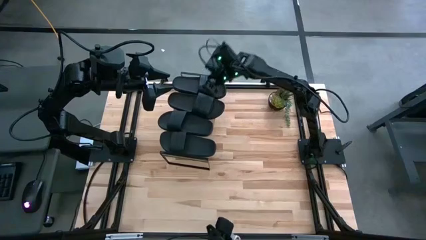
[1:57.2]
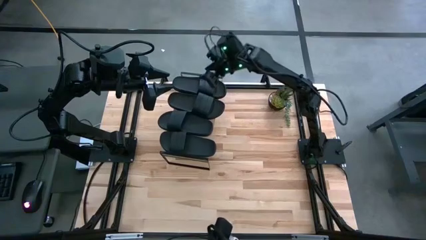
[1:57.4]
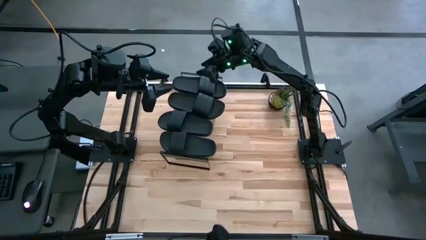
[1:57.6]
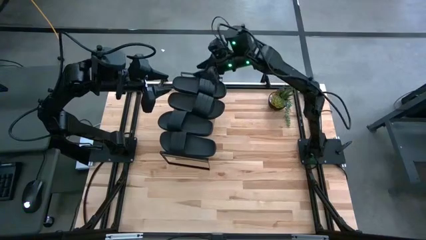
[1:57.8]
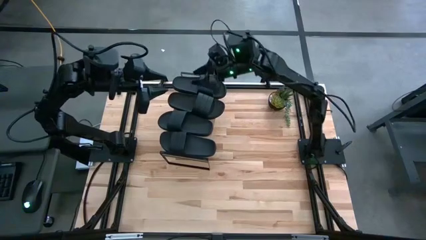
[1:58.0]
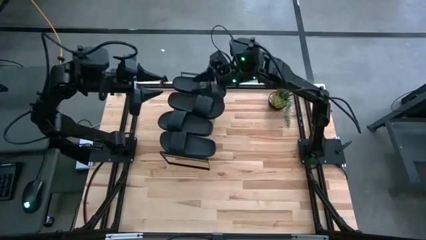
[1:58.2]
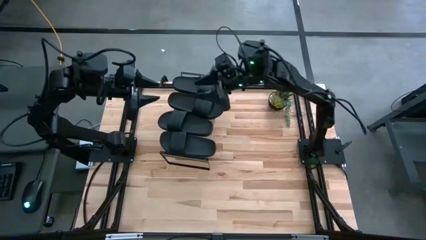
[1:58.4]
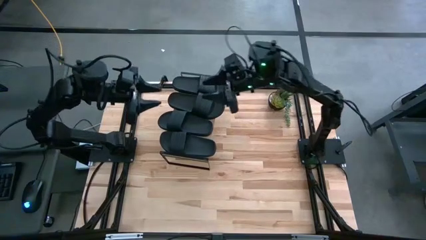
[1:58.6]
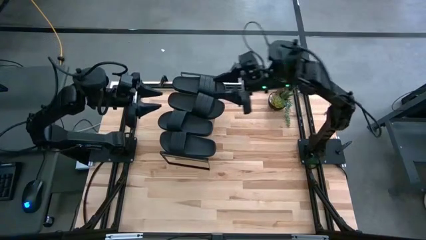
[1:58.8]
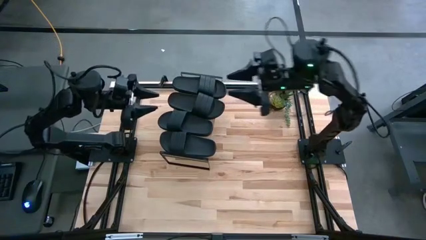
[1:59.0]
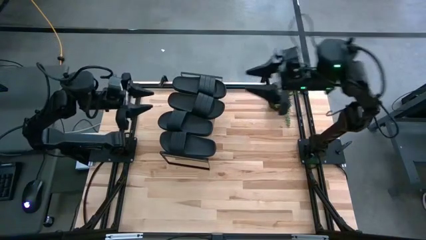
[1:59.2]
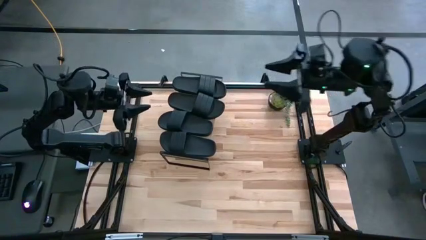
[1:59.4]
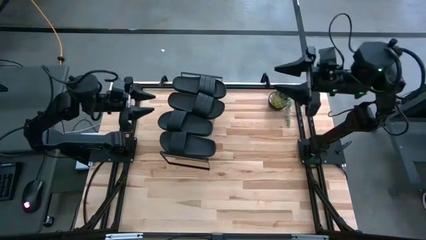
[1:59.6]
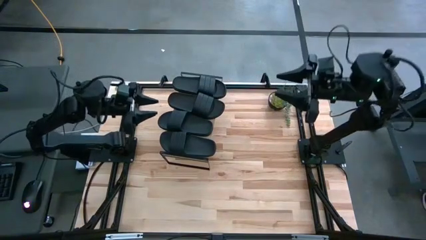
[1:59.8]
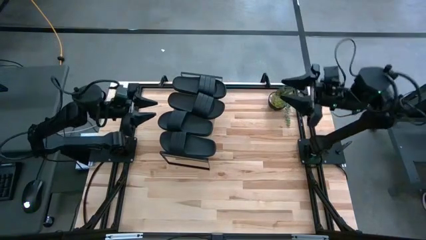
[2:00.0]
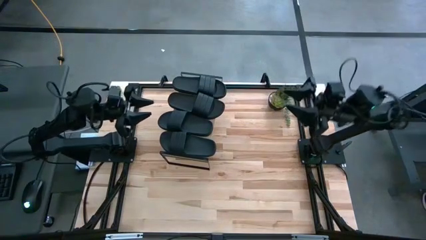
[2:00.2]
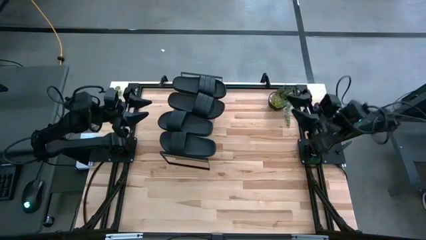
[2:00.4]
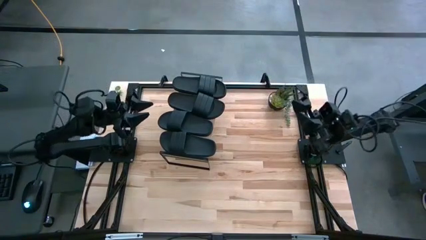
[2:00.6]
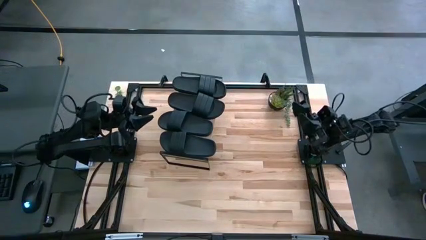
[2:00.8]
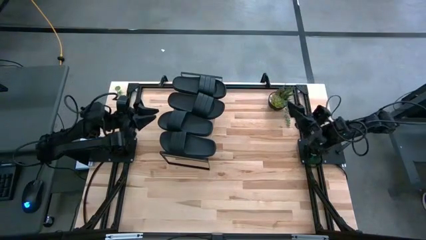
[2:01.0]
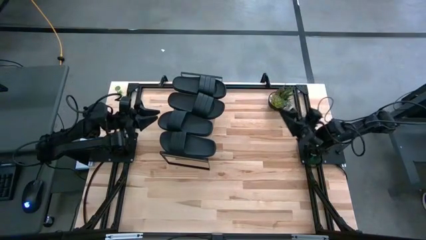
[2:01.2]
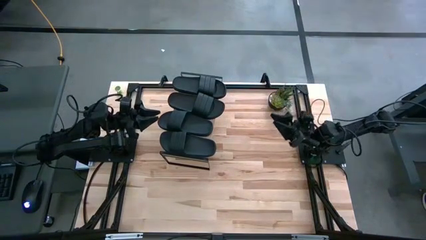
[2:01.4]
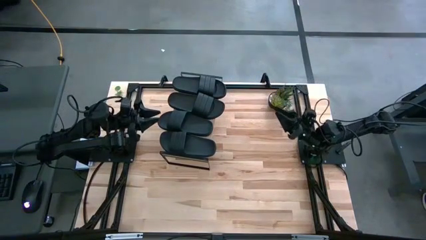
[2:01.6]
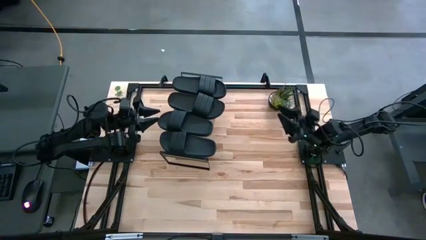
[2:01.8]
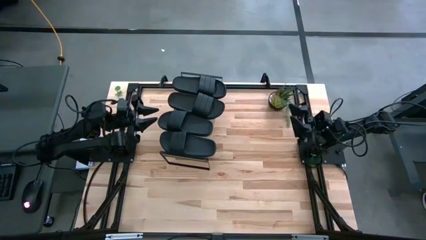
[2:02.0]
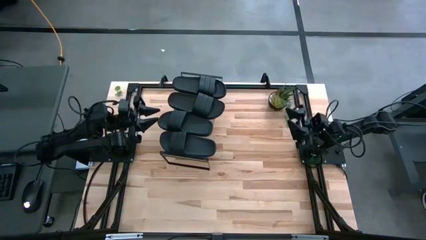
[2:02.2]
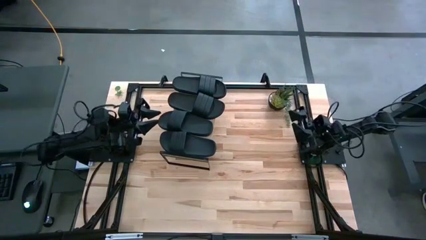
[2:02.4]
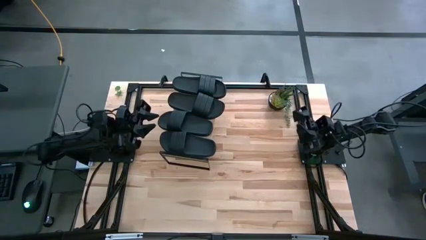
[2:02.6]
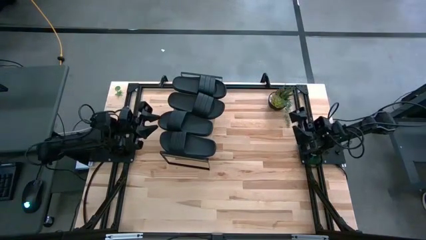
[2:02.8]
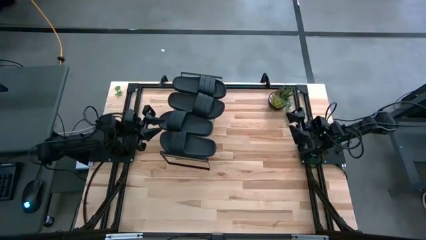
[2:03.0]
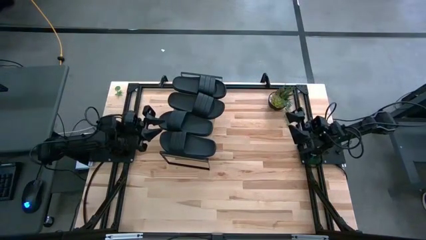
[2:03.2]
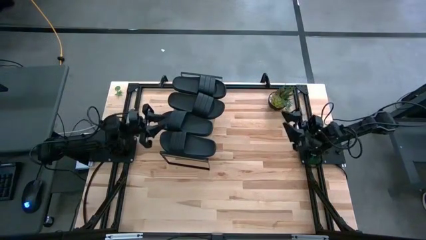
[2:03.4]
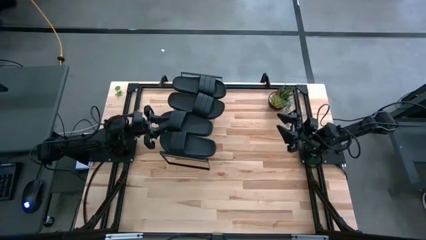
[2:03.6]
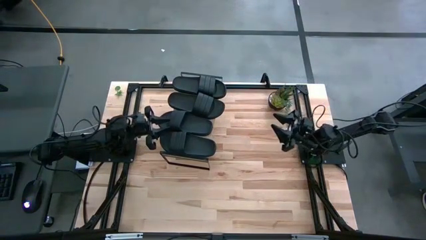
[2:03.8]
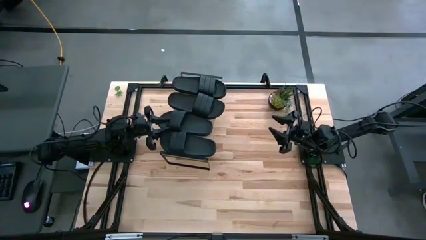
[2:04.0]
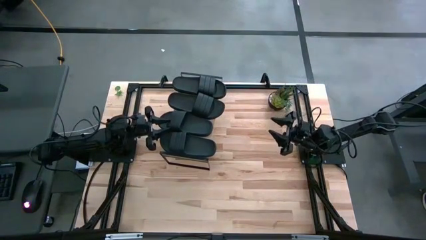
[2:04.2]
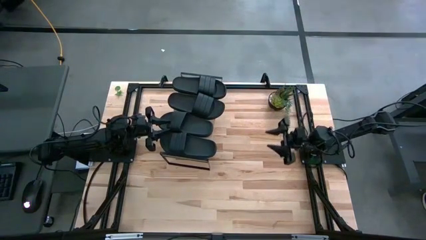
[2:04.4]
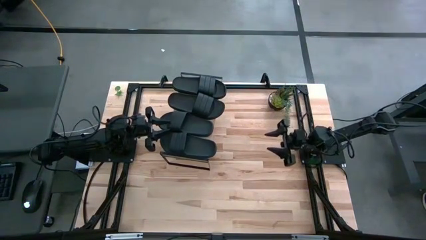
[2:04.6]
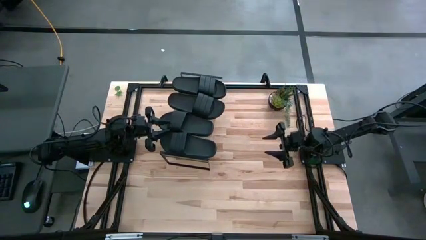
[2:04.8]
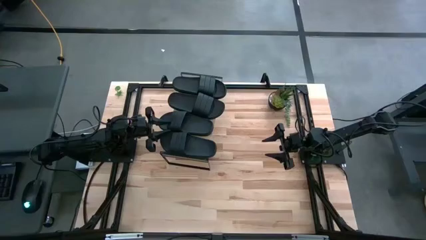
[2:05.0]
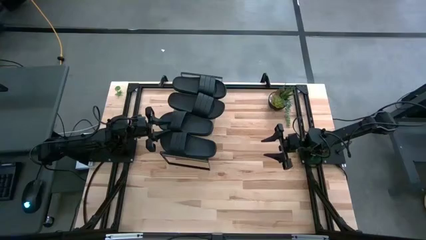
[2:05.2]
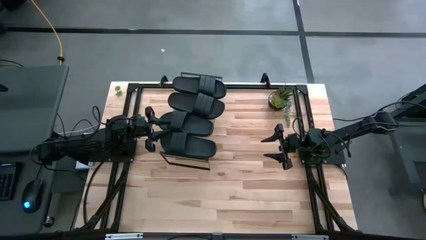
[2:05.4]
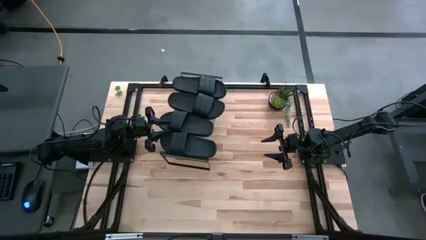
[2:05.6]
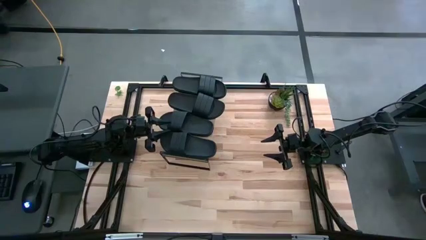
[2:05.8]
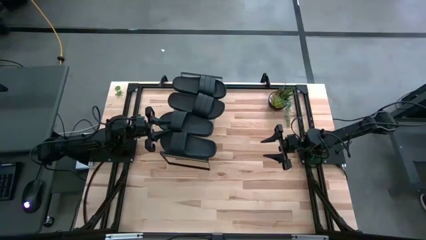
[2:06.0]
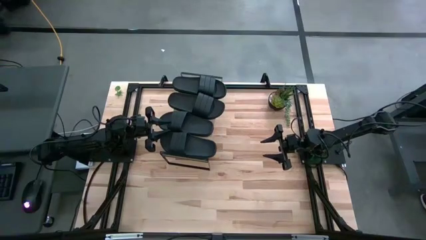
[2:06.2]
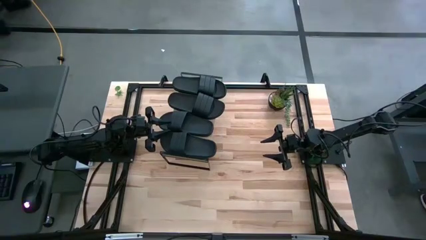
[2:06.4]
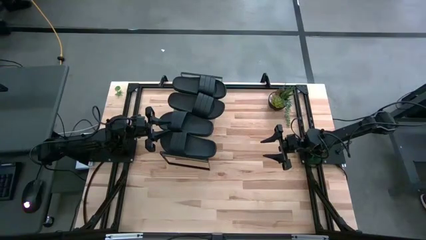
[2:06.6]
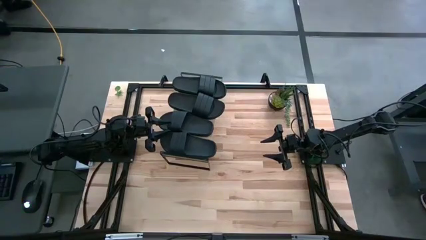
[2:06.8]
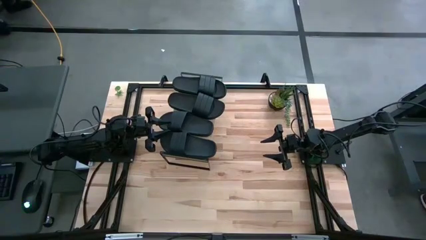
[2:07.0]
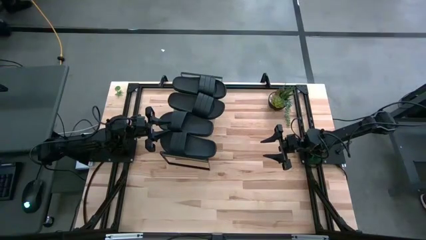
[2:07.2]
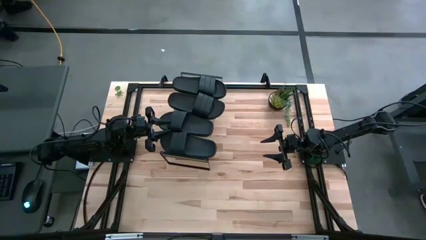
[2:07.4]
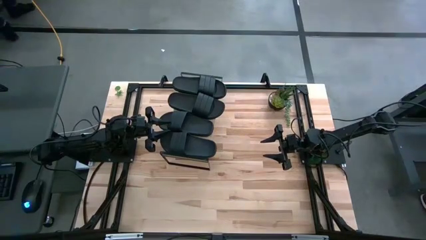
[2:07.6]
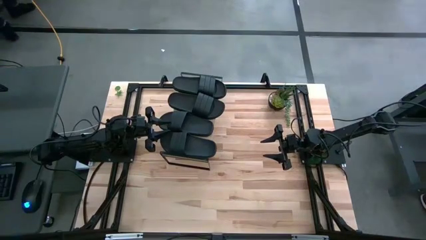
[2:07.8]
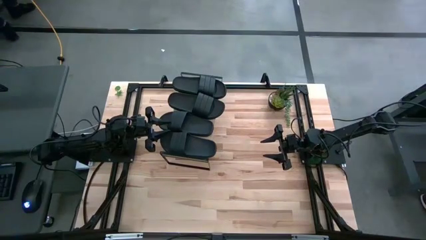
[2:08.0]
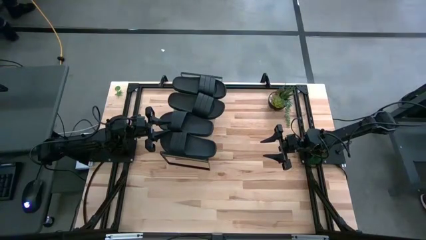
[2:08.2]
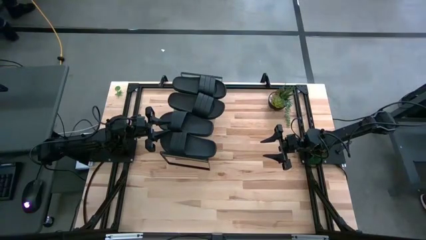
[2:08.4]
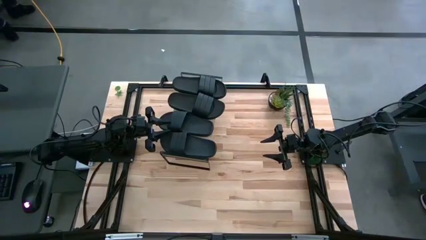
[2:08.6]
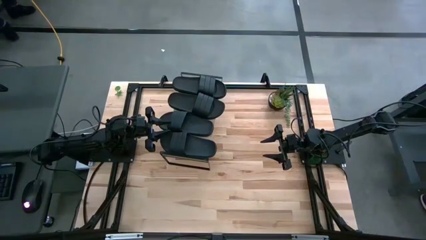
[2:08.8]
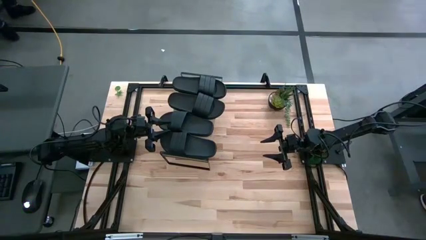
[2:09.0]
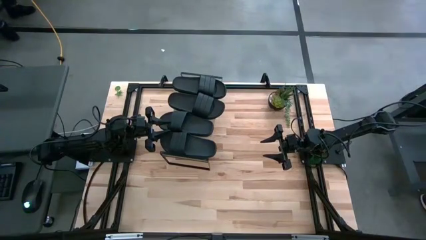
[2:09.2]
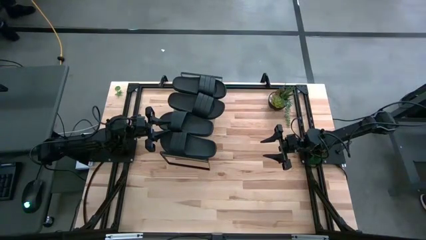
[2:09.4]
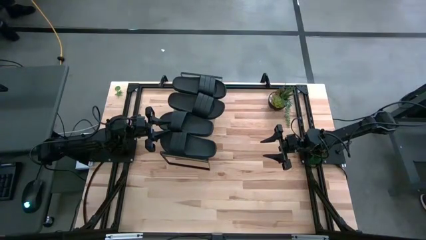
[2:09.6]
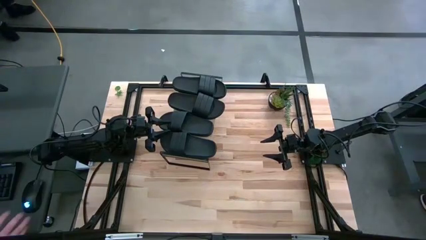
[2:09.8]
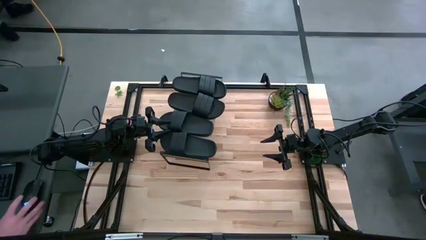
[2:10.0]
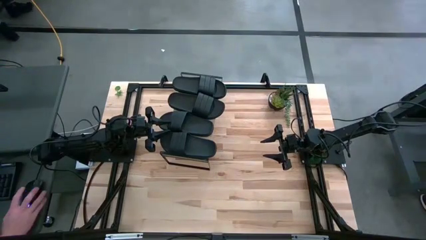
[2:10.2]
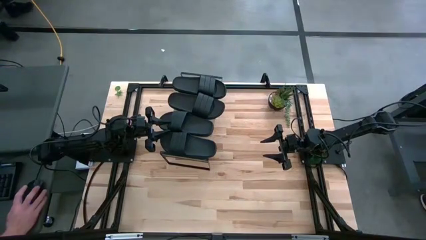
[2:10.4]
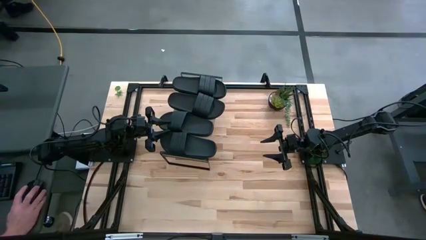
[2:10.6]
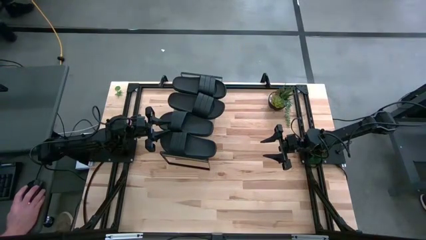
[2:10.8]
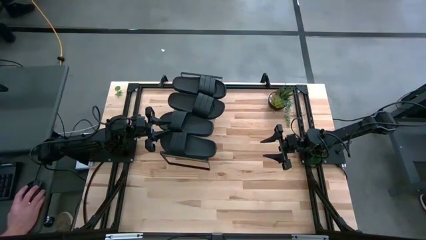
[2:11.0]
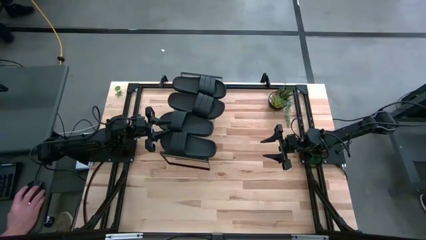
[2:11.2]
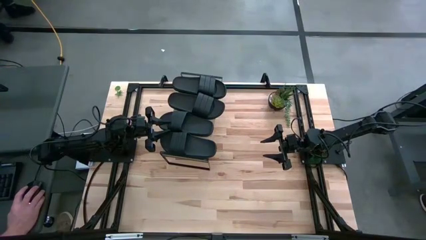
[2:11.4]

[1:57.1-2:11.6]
Task: Pick and place slides into the shelf
Return to Home Position

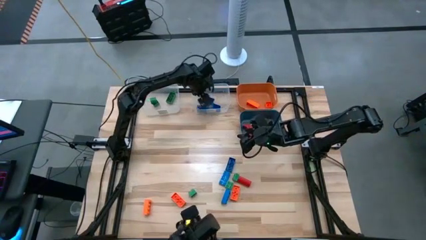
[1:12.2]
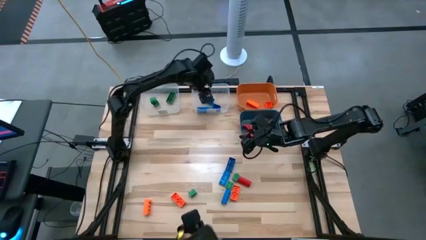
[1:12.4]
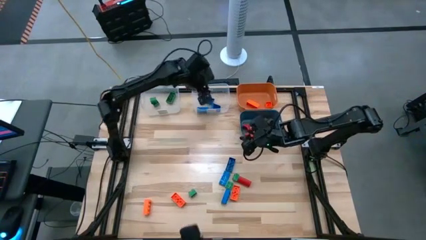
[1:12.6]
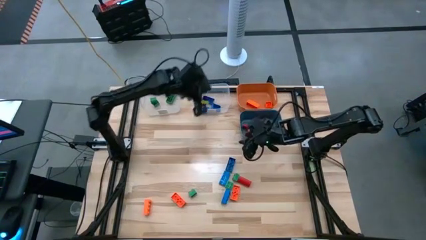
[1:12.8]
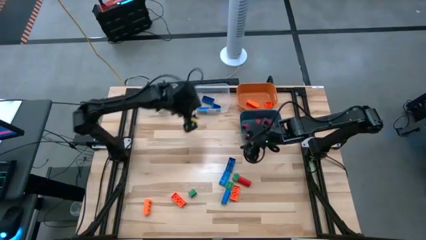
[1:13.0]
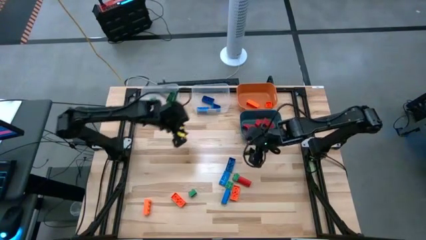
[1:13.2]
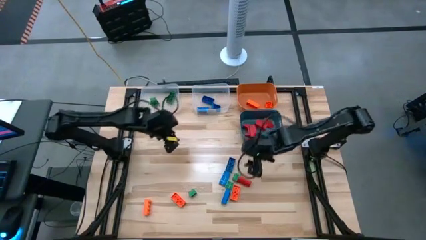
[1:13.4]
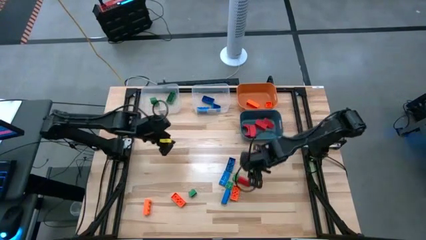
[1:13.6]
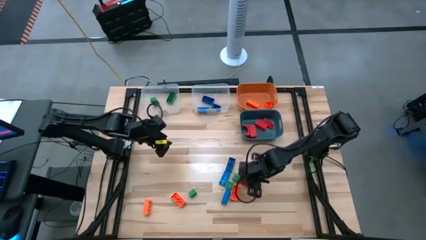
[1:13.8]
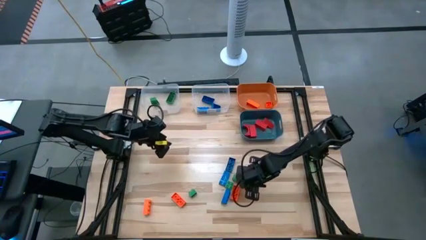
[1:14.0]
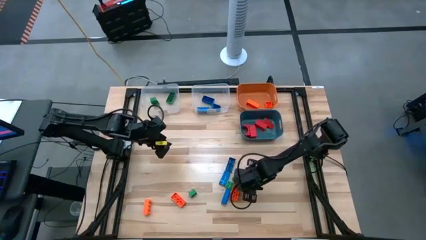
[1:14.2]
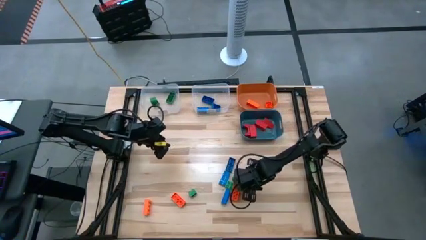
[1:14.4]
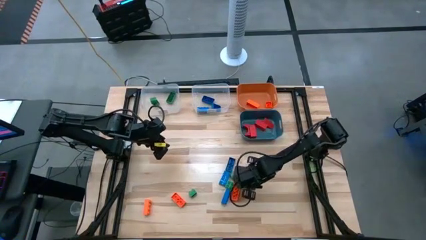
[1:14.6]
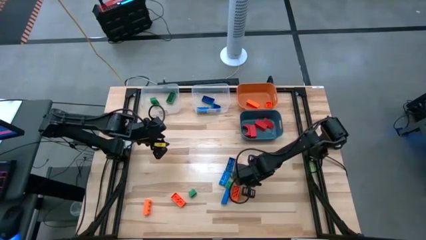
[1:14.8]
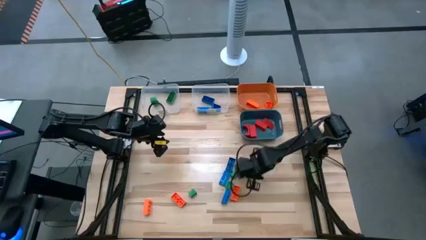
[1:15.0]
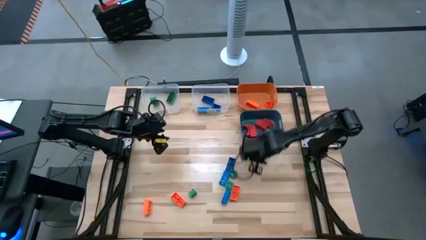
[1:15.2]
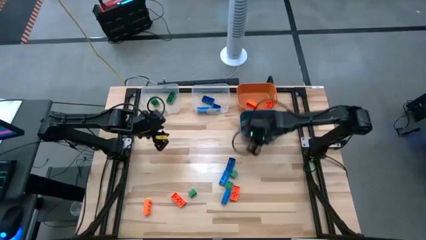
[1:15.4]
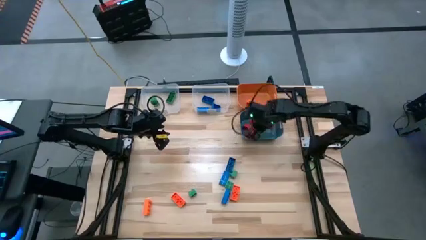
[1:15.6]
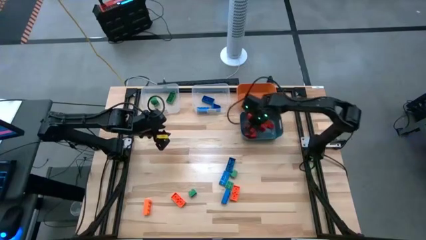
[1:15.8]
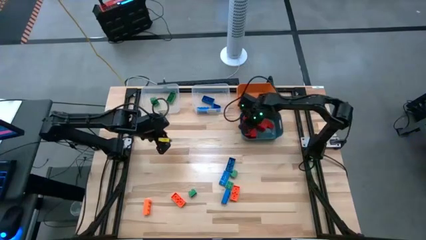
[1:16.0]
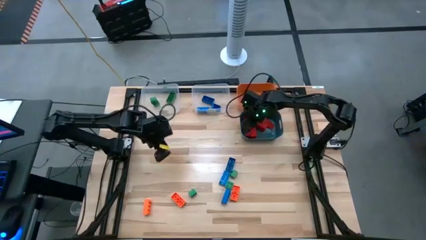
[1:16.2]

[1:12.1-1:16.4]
Task: Sort blocks
Put the red block into the blue bin
